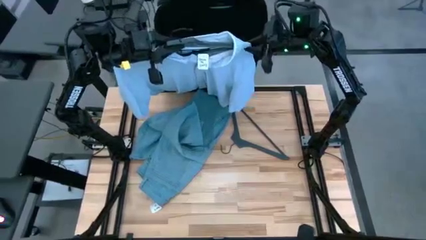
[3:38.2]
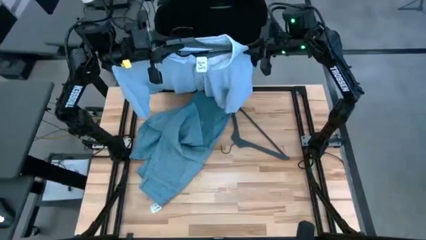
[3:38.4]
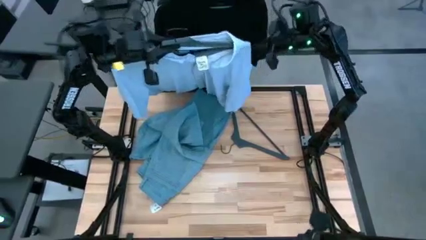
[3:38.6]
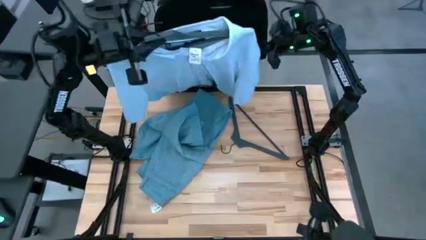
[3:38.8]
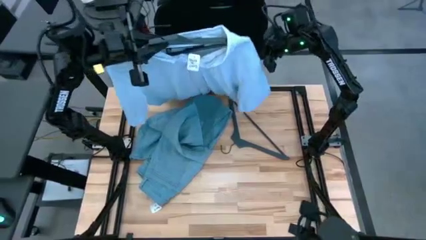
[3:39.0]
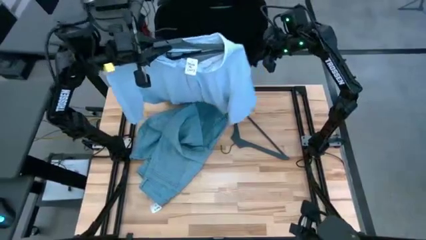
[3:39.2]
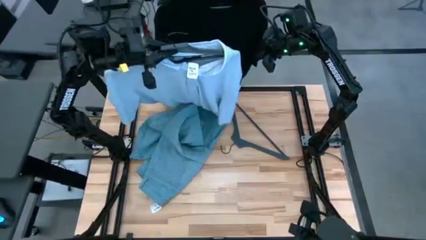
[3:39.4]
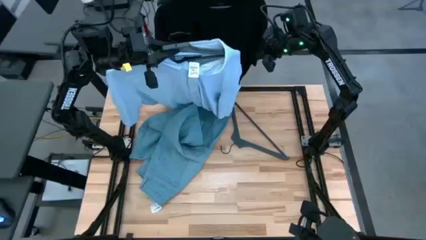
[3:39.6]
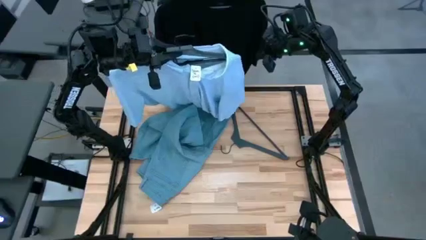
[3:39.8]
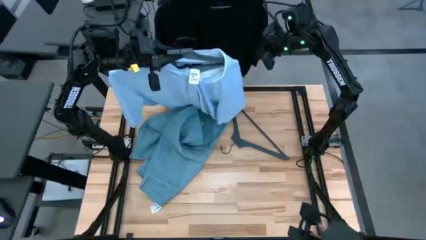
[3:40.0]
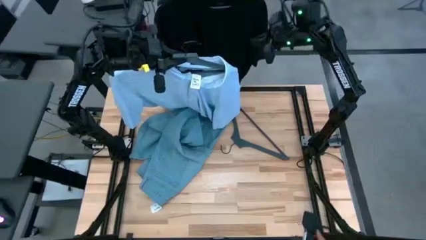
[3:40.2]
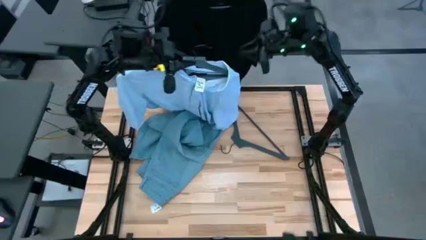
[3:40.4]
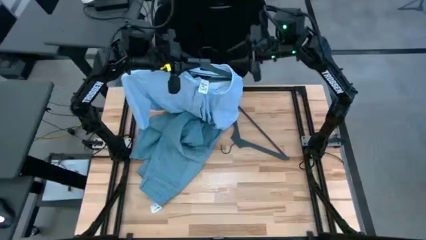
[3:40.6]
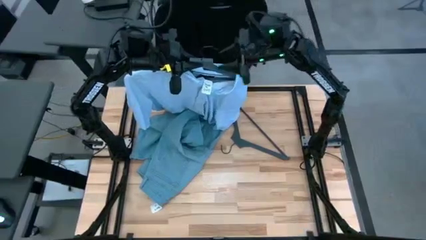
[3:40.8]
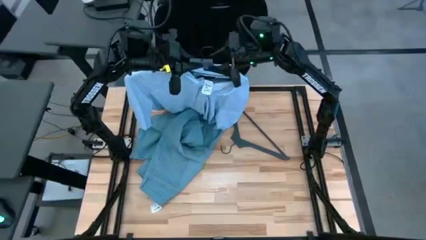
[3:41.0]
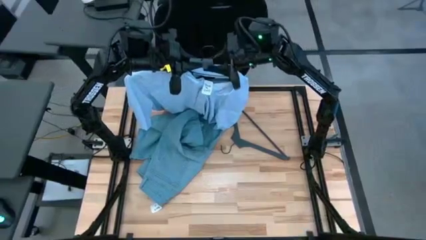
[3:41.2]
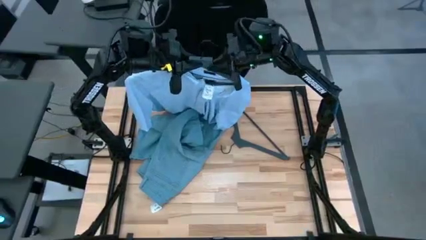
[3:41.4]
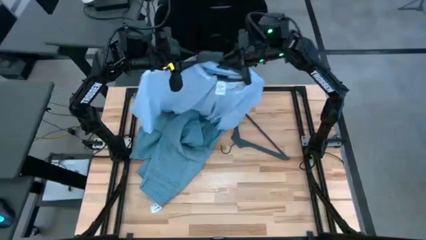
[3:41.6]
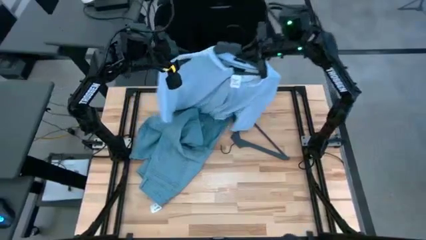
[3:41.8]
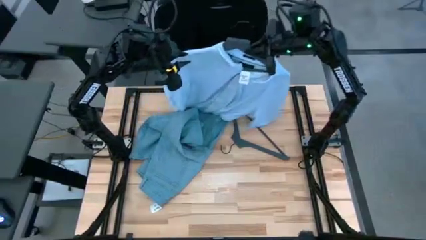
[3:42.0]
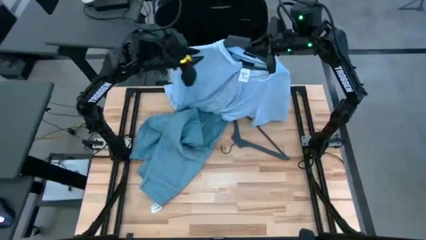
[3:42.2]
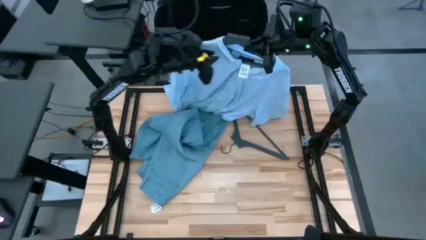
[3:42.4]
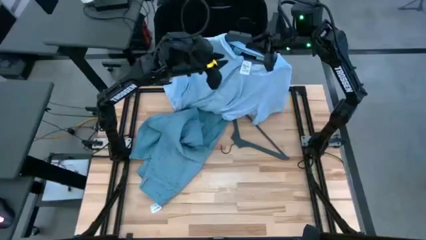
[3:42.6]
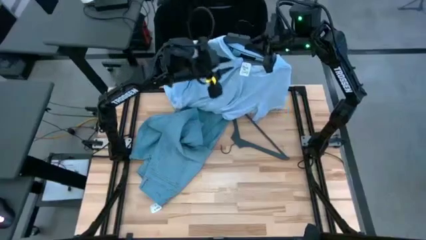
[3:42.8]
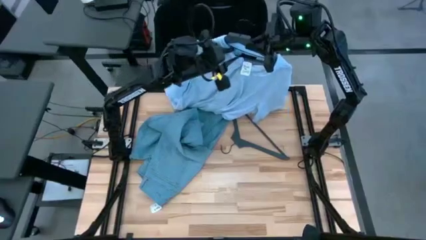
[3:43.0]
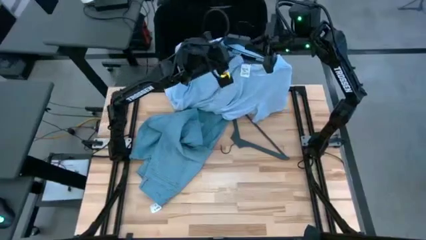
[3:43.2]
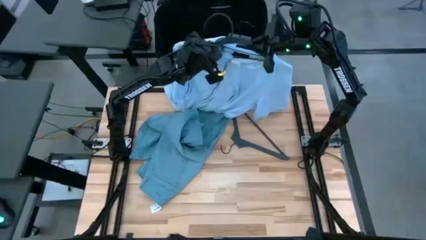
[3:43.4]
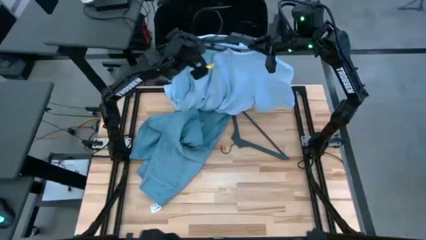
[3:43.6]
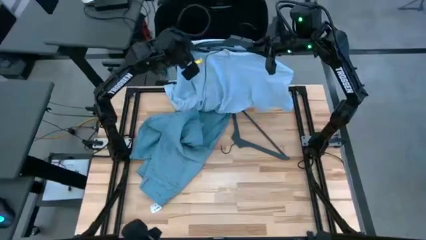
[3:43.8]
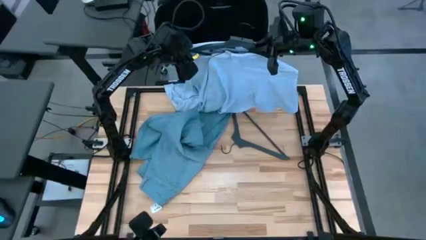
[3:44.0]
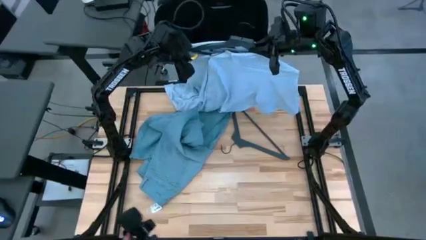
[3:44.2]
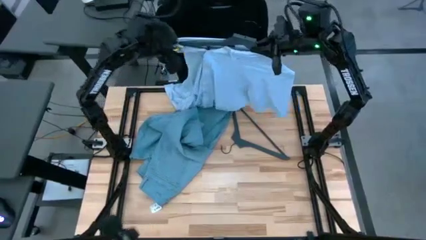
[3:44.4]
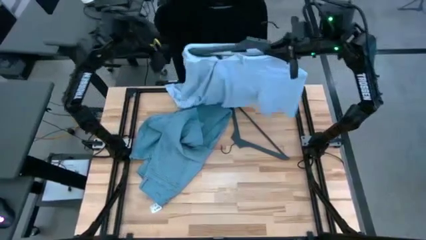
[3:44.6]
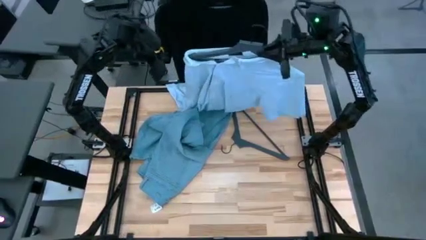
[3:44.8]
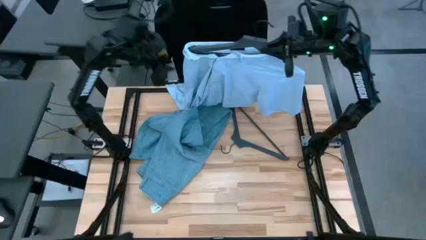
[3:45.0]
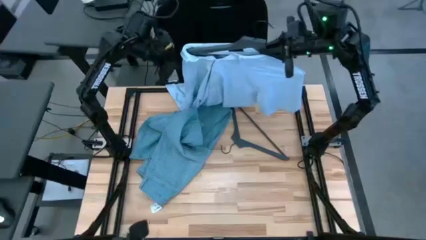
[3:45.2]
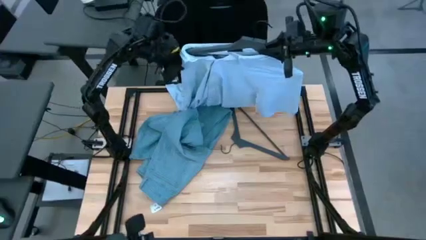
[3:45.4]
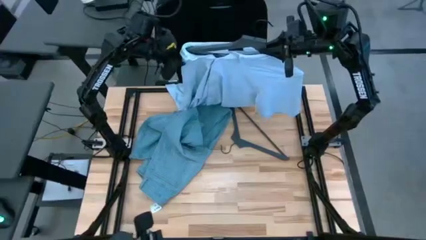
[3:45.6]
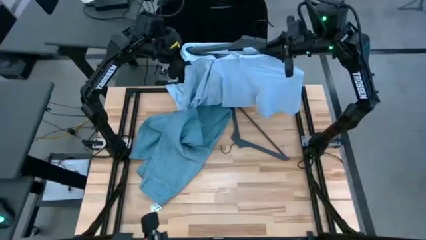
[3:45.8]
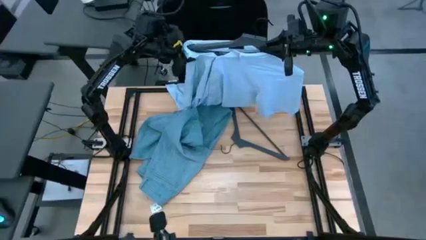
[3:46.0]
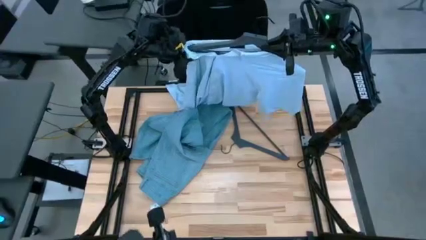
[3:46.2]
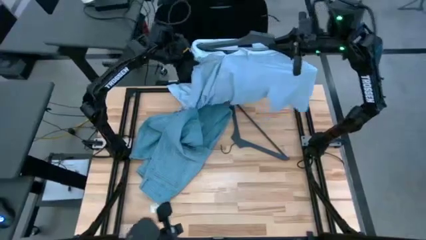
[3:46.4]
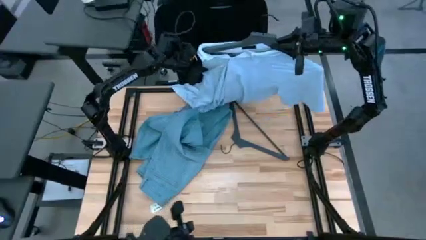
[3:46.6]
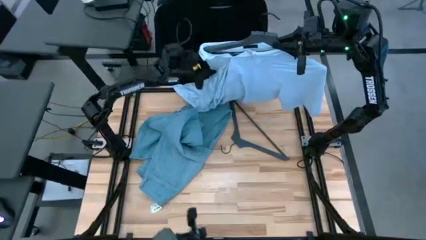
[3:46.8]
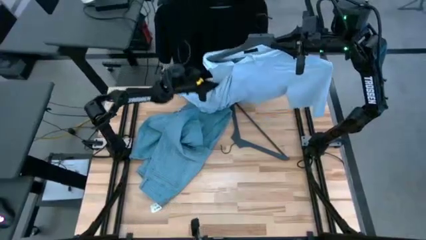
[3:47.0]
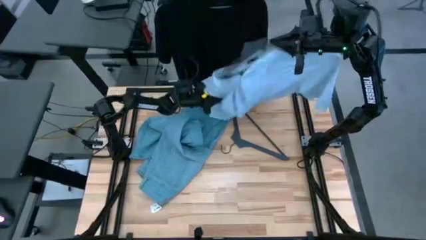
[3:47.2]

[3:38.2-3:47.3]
Task: Hang clothes
Unhang the blue shirt from the rack

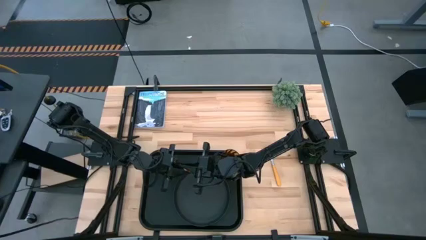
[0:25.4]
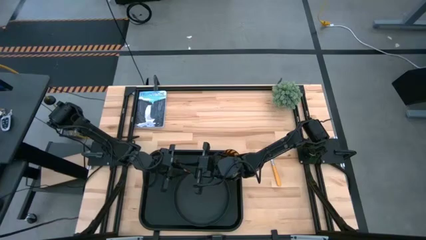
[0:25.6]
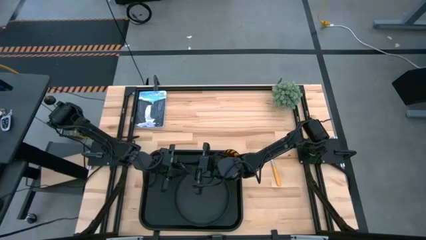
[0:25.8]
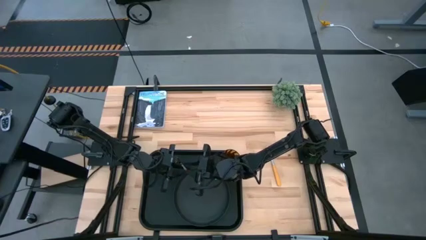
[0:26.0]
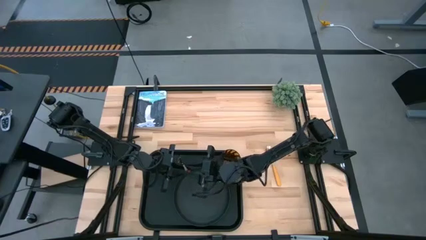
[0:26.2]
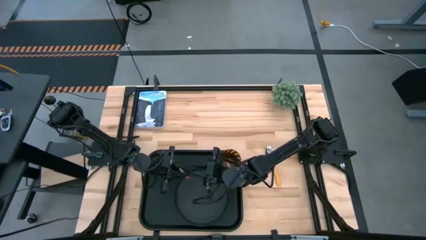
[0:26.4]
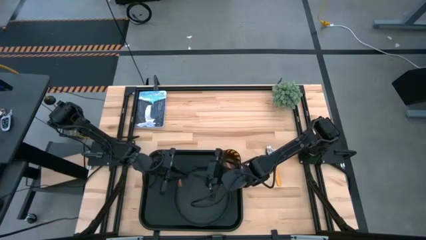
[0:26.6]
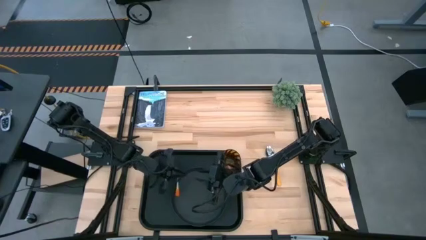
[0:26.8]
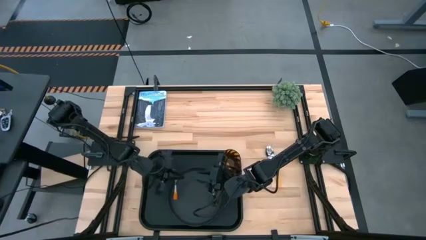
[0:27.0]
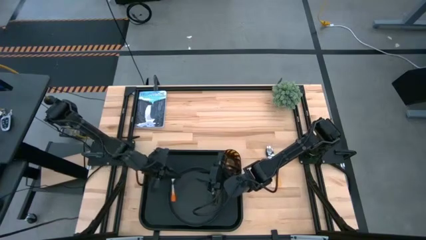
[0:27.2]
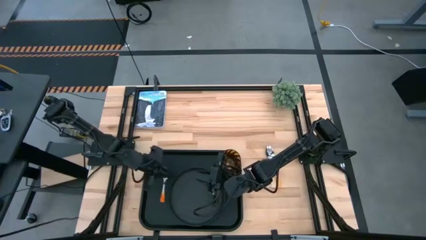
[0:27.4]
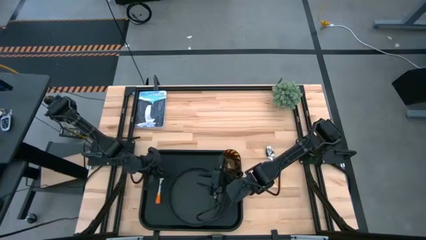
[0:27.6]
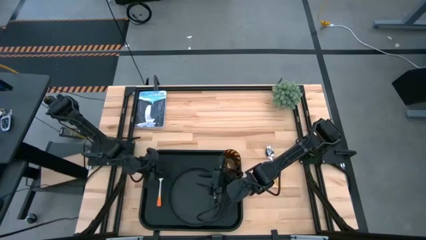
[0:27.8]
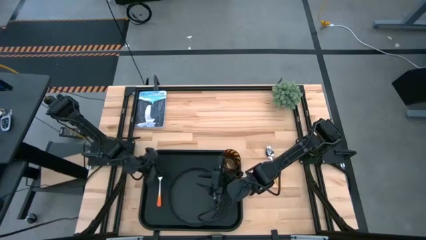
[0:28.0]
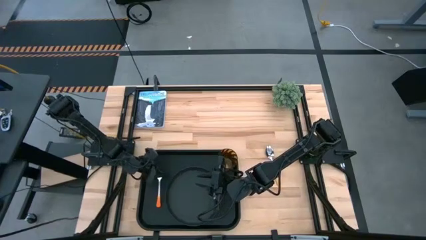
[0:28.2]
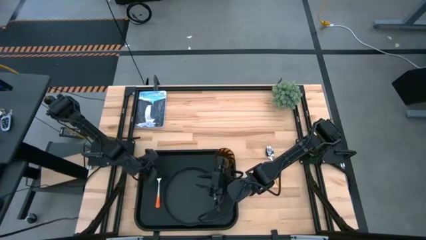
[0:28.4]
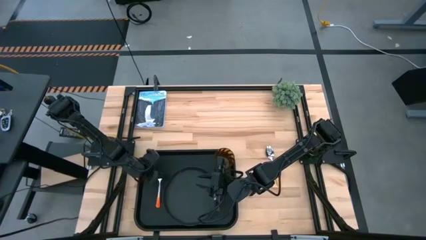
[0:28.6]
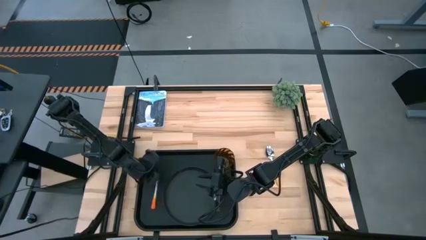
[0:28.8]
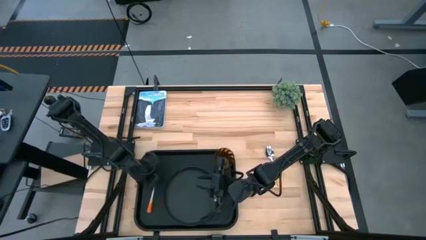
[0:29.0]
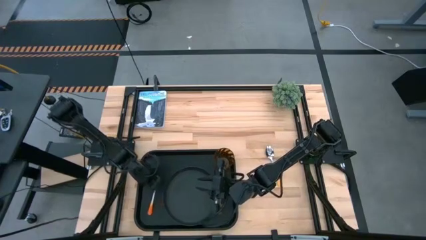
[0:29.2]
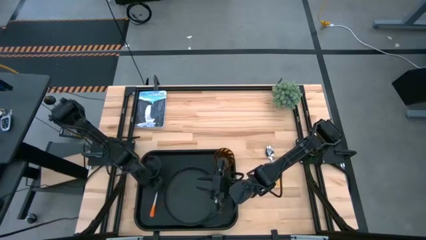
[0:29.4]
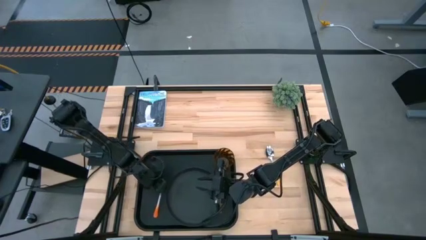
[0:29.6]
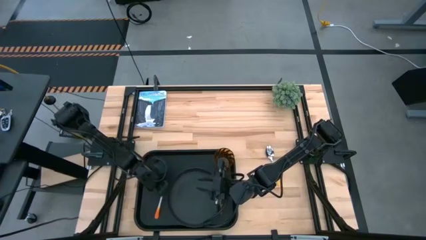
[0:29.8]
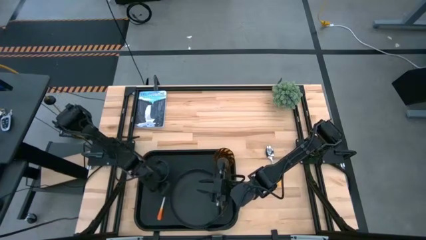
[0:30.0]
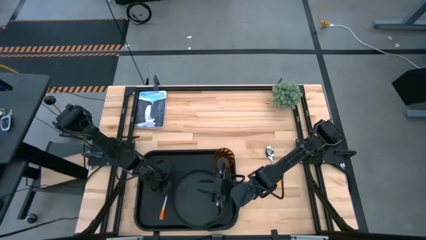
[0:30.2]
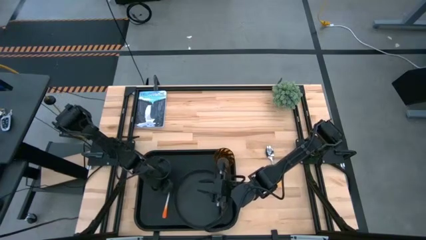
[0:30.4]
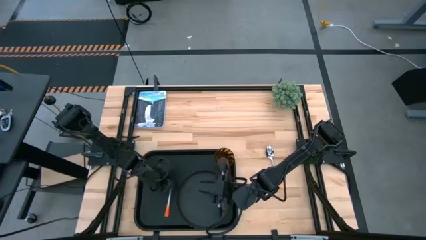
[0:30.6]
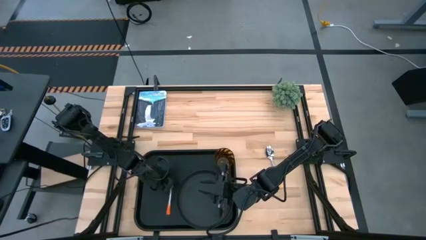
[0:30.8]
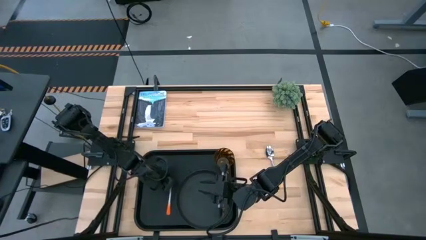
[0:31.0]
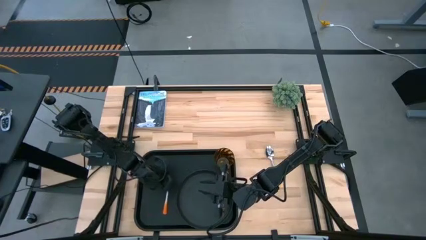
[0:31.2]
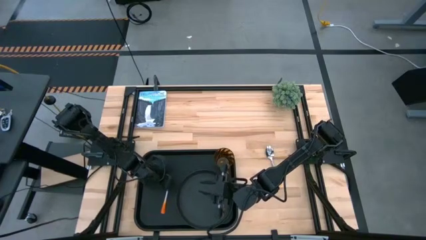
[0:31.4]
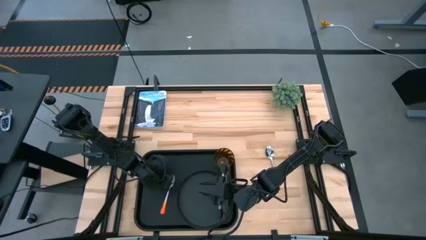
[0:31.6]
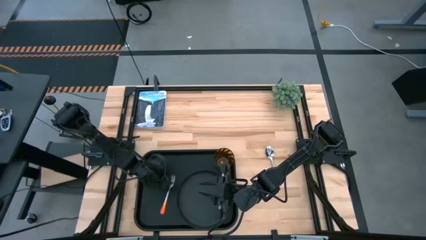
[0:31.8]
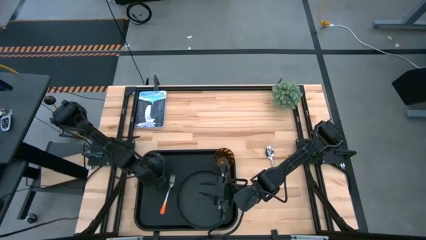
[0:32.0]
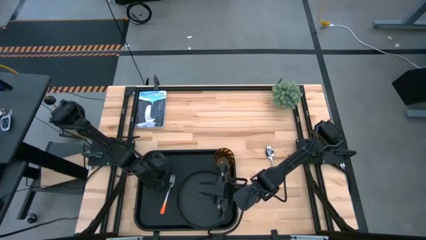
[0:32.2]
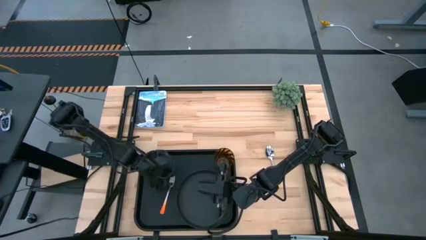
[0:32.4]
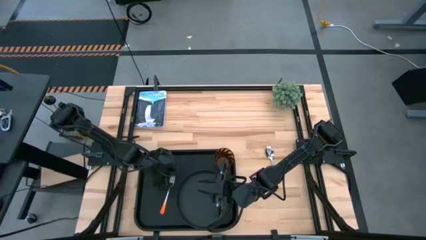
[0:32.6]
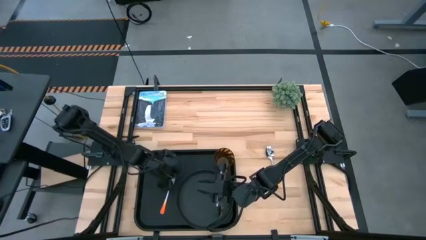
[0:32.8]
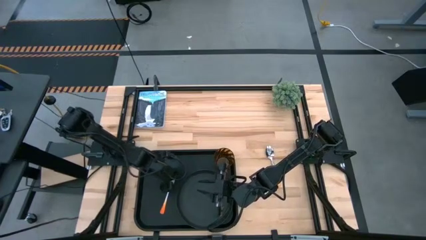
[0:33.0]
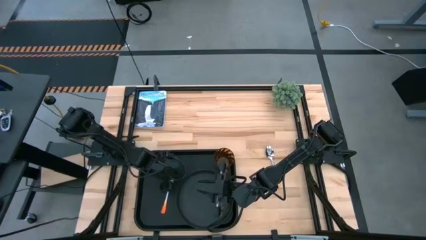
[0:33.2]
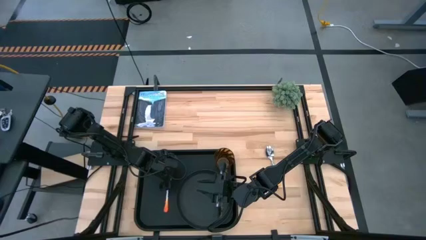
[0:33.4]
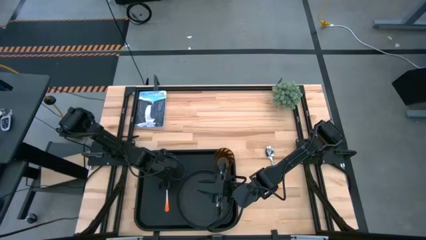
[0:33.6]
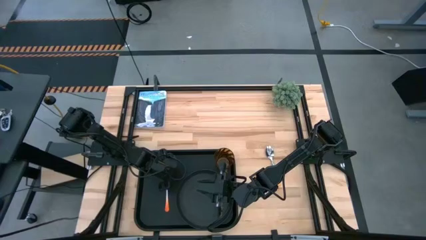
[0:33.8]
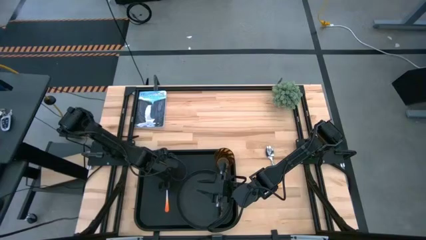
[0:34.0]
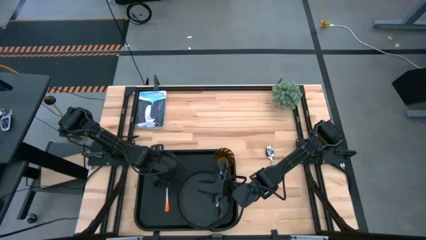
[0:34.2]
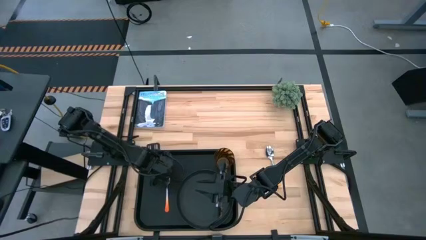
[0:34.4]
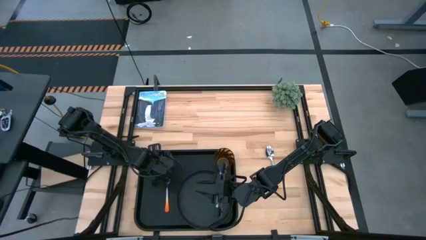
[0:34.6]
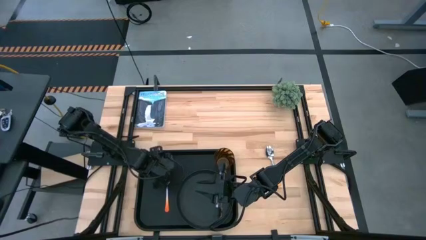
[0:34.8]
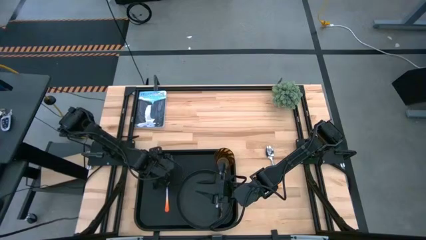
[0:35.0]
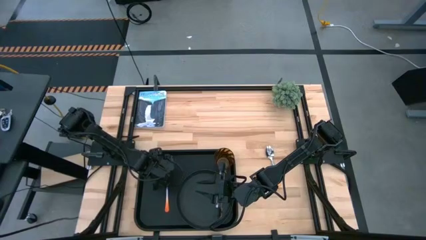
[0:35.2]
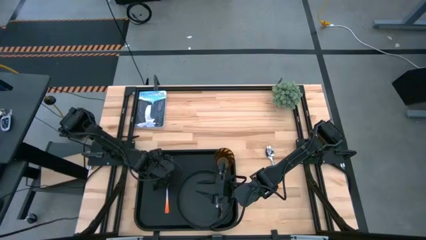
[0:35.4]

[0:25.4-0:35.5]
Task: Pick and place plate/cup/fork/spoon on tray
Put the orange fork to the left of the black plate on the black serving tray
